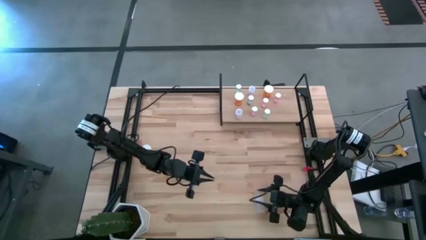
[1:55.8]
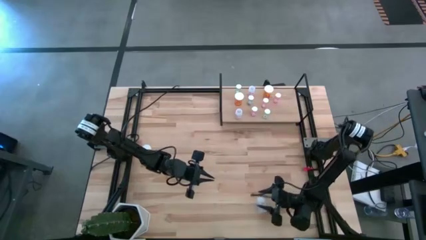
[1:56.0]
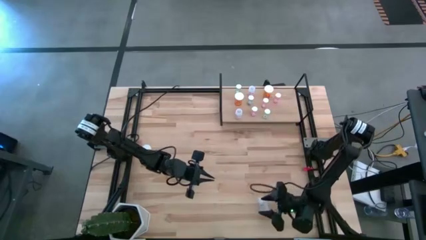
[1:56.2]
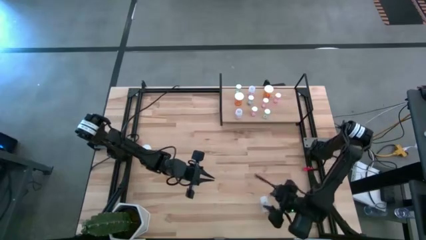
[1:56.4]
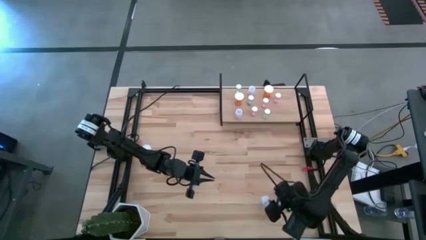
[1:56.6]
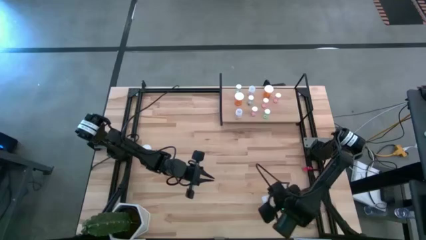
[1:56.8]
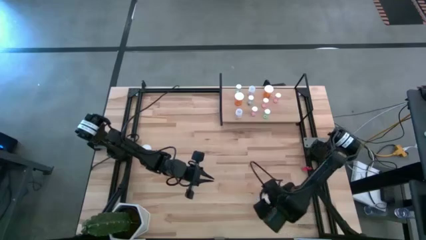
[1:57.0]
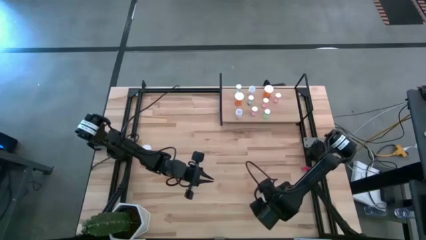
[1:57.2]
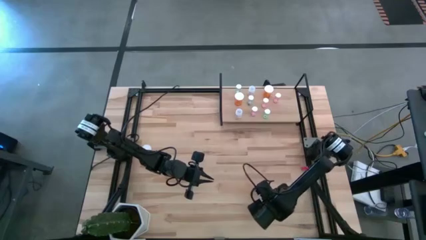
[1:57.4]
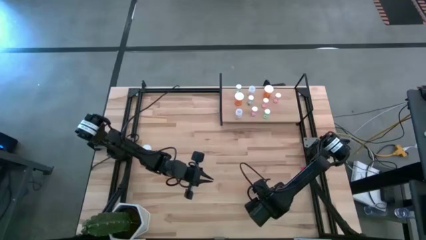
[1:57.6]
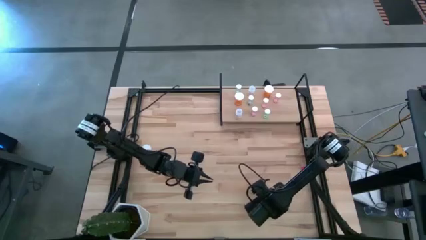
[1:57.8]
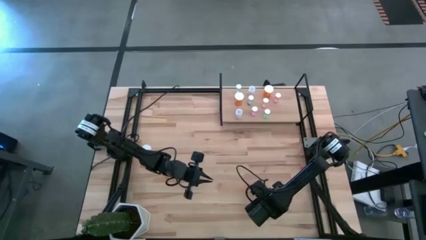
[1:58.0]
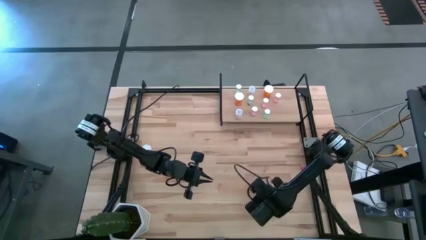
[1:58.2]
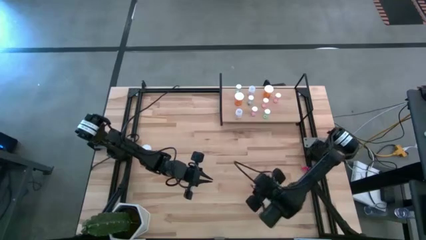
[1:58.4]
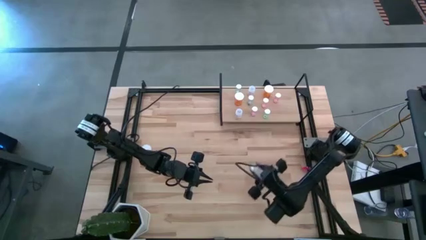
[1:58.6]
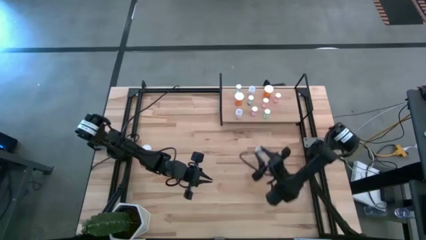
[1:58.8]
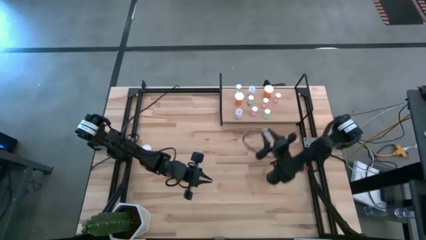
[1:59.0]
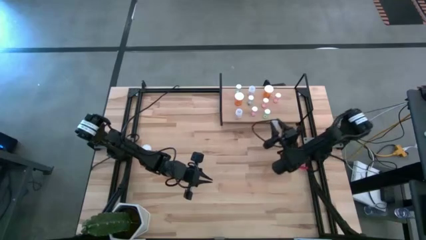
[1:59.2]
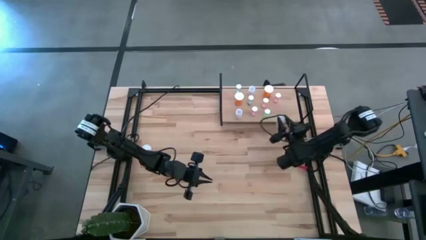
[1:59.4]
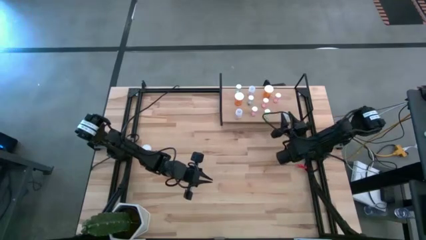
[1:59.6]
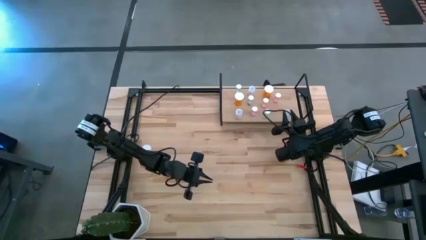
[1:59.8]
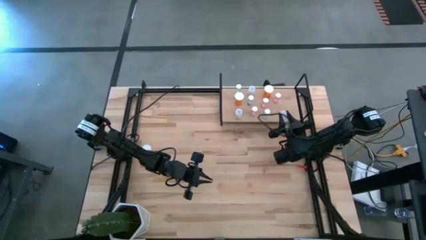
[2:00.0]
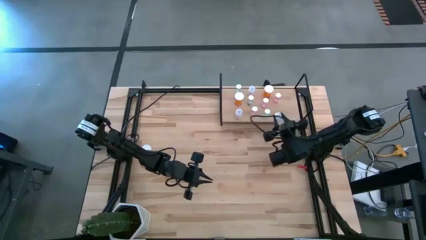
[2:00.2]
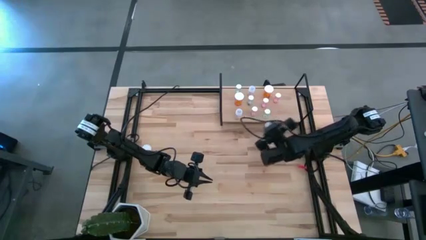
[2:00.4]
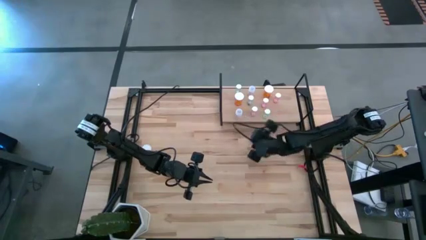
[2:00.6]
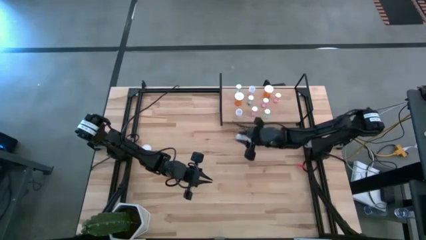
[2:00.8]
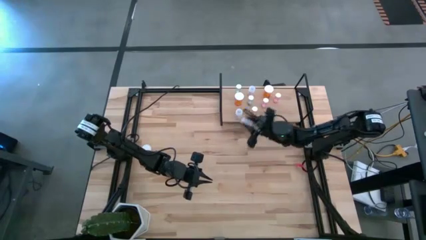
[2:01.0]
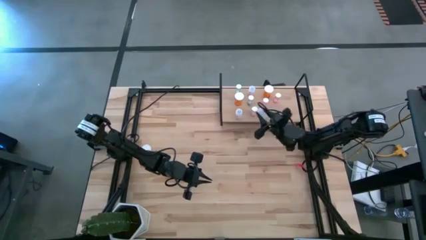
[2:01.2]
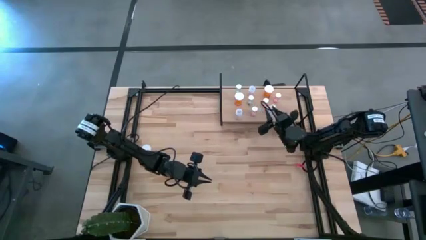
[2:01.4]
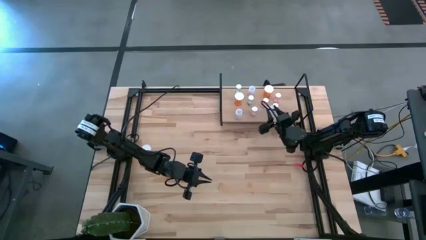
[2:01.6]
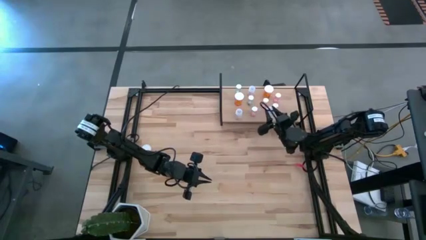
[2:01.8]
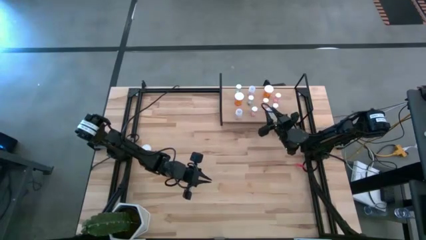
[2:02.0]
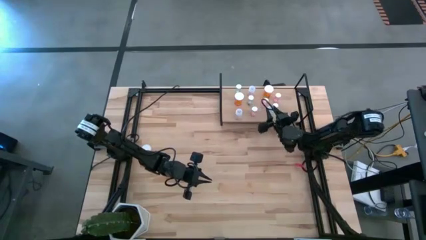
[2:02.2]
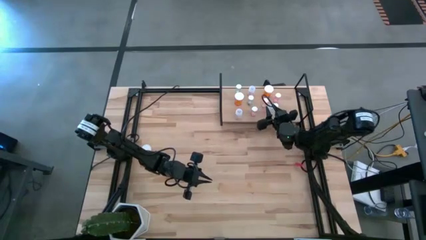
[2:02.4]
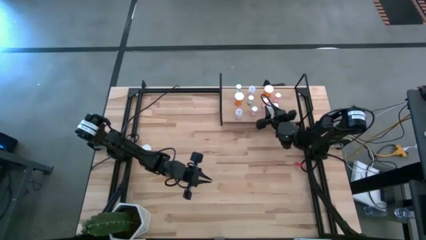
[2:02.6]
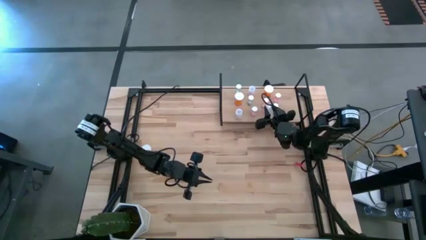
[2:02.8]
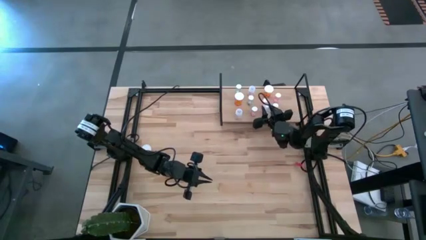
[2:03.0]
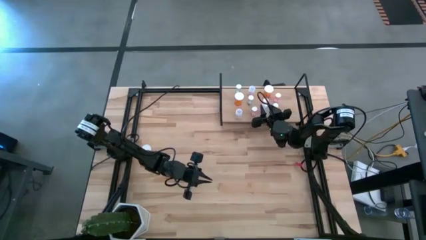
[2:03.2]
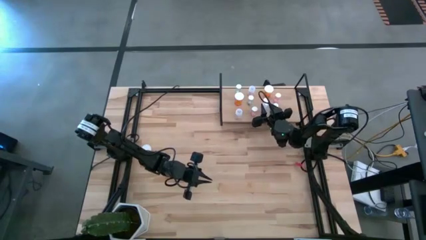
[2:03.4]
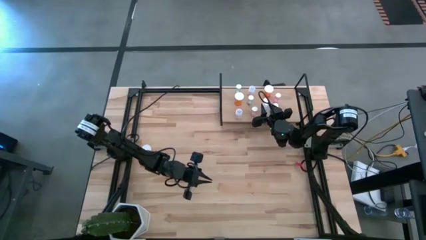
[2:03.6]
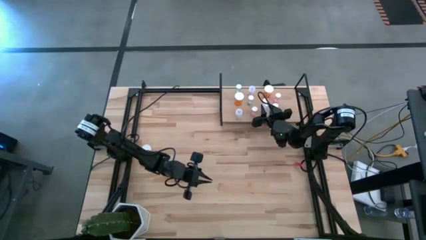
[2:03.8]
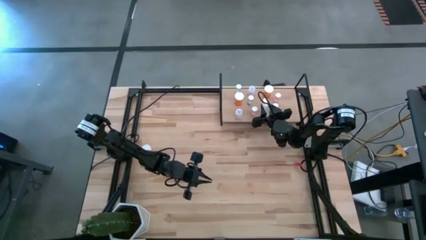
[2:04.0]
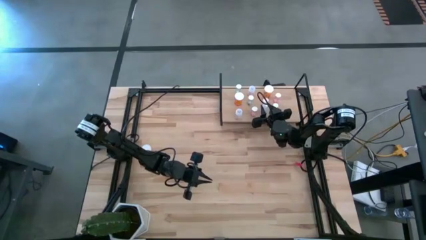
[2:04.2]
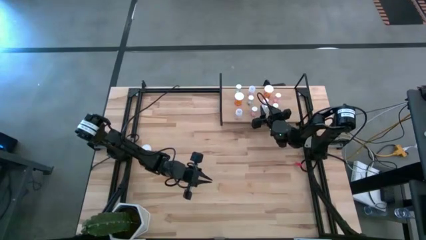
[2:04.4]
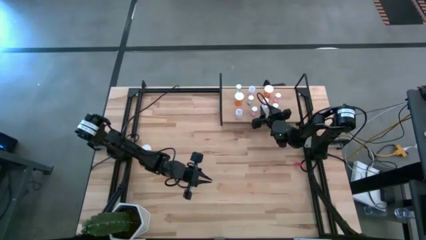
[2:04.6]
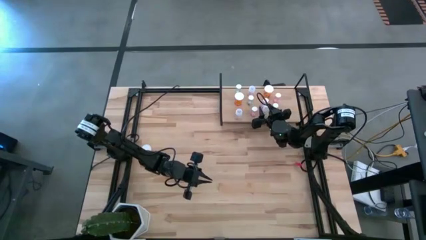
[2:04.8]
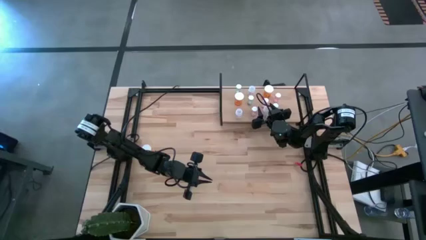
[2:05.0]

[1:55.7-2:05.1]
Task: Pick and place medicine bottles onto shelf by color
Put the transparent pill bottle on the shelf

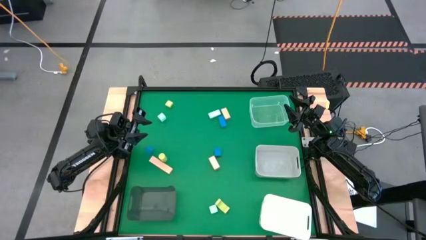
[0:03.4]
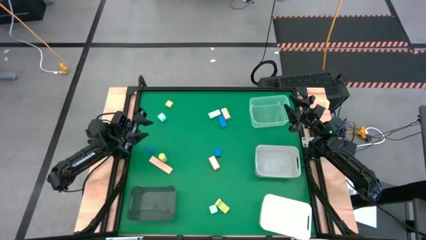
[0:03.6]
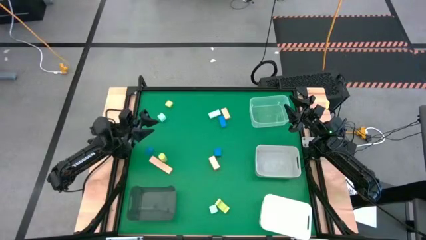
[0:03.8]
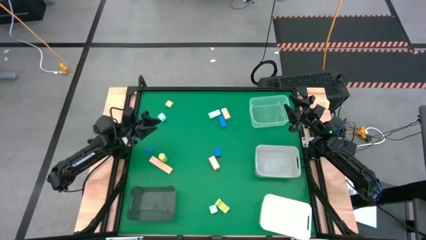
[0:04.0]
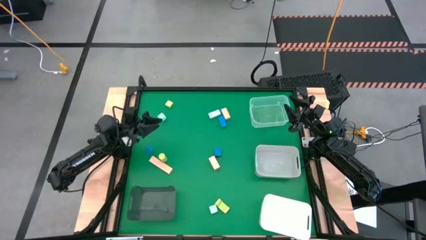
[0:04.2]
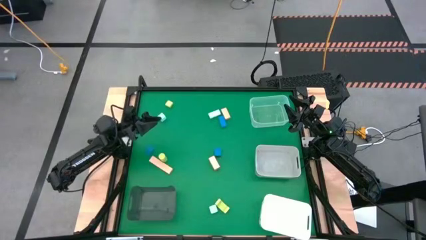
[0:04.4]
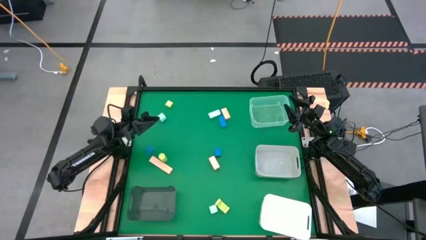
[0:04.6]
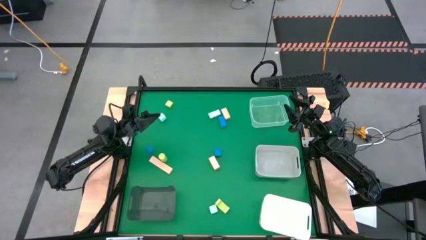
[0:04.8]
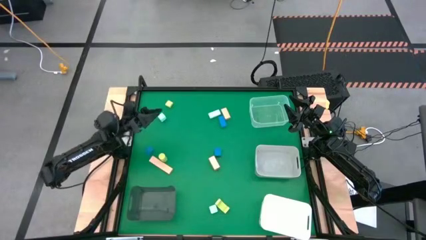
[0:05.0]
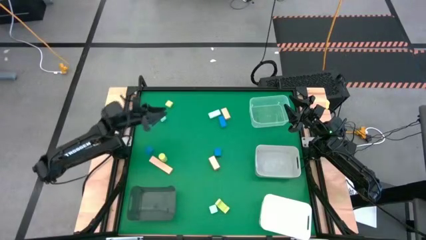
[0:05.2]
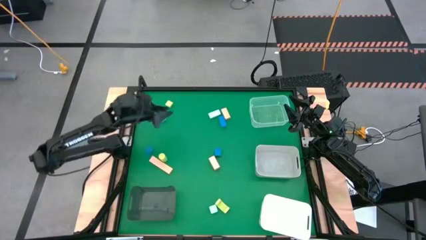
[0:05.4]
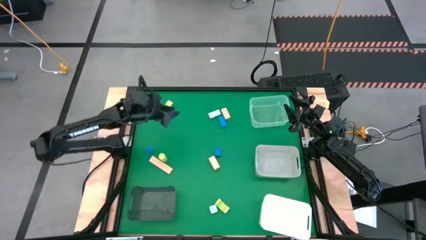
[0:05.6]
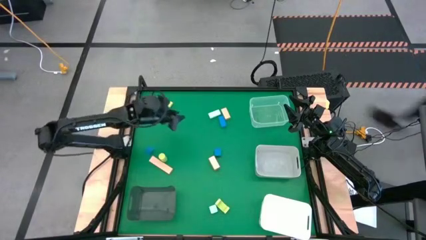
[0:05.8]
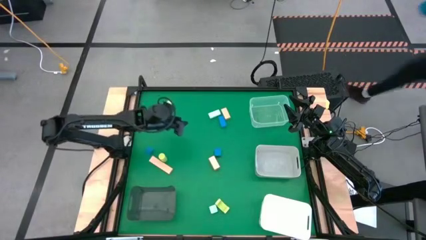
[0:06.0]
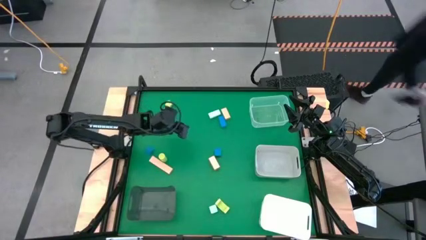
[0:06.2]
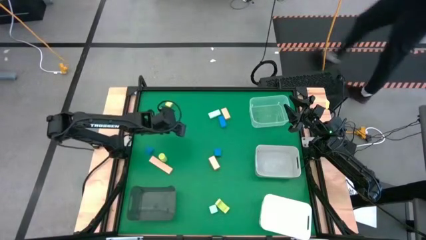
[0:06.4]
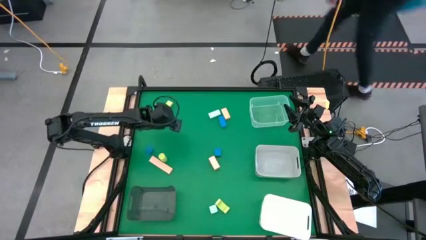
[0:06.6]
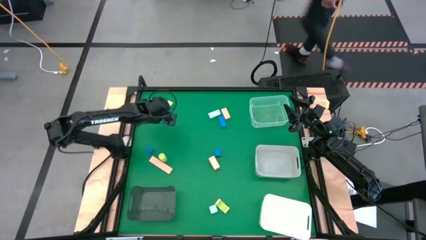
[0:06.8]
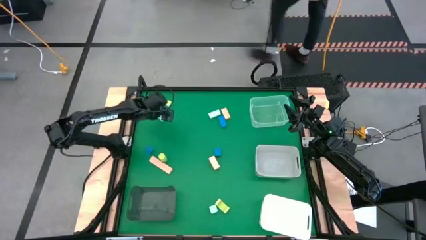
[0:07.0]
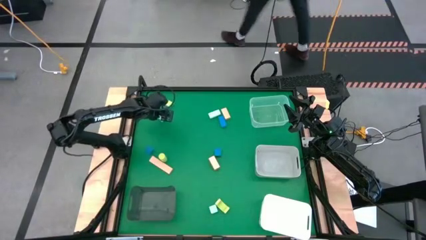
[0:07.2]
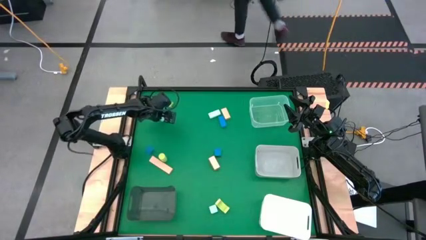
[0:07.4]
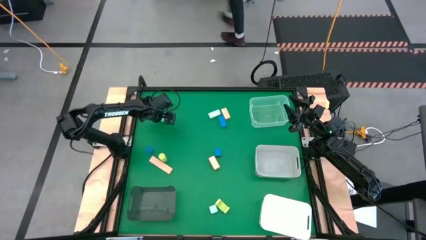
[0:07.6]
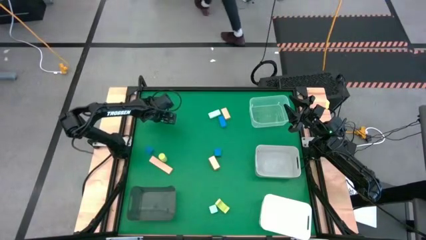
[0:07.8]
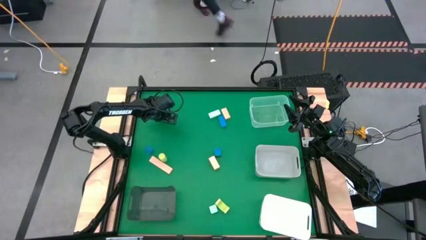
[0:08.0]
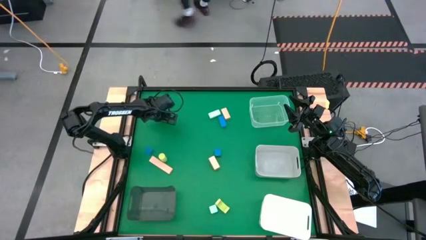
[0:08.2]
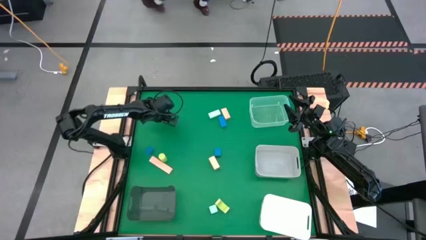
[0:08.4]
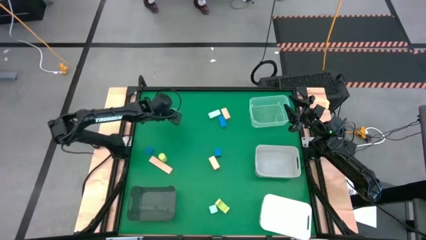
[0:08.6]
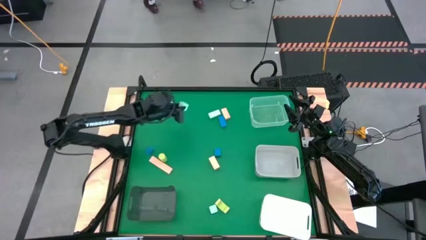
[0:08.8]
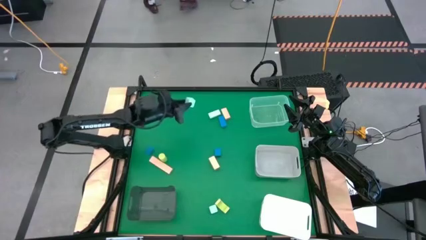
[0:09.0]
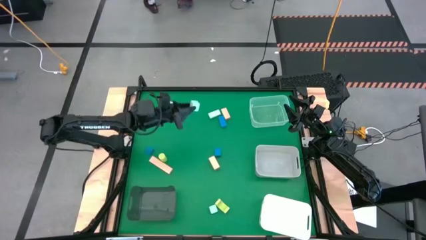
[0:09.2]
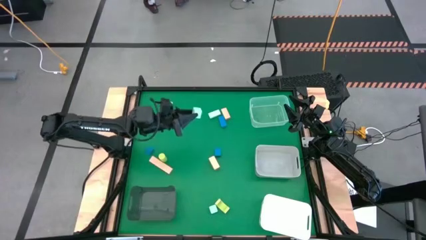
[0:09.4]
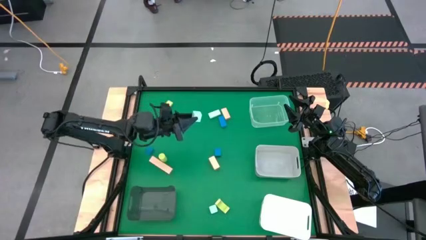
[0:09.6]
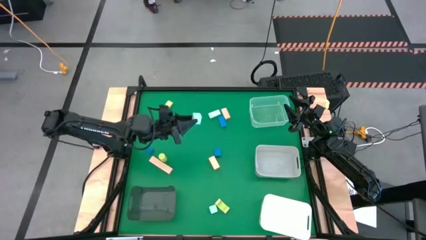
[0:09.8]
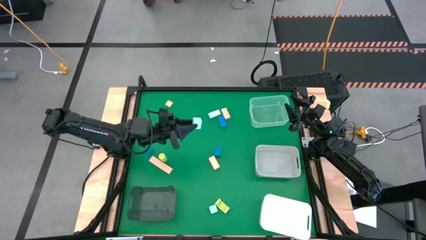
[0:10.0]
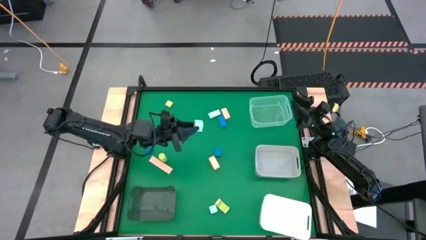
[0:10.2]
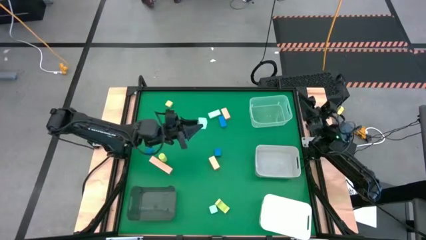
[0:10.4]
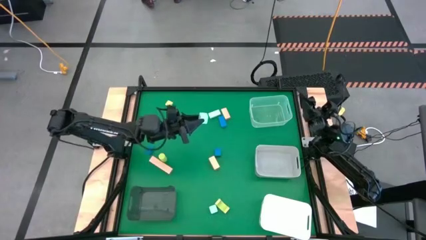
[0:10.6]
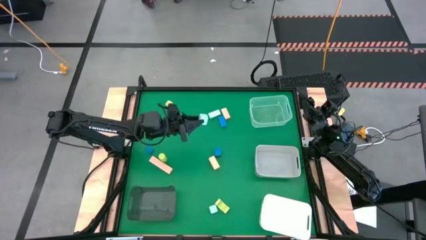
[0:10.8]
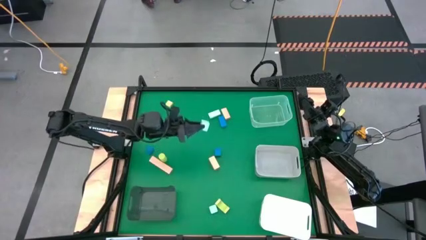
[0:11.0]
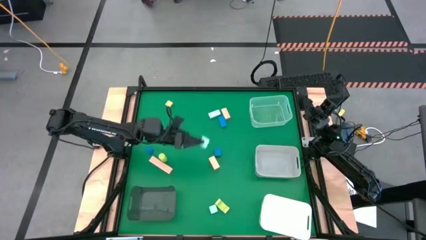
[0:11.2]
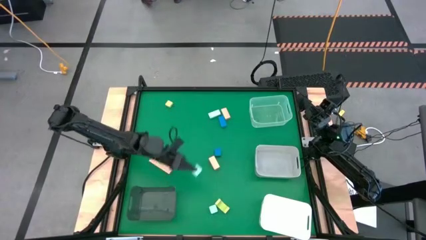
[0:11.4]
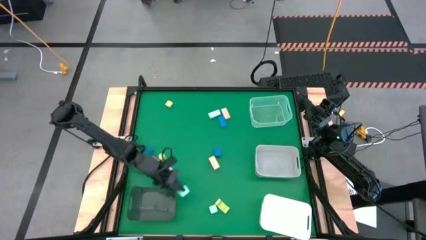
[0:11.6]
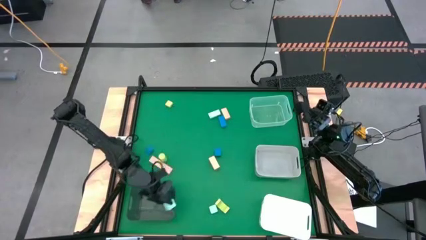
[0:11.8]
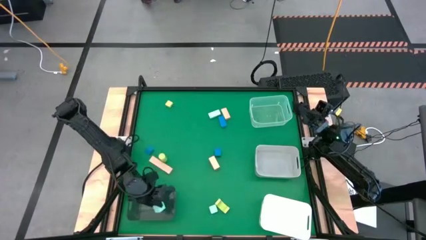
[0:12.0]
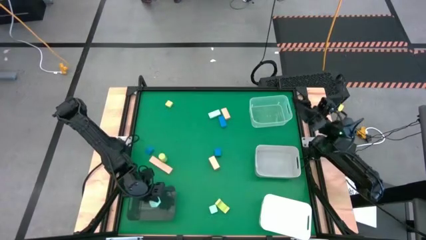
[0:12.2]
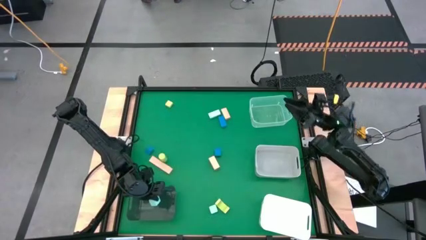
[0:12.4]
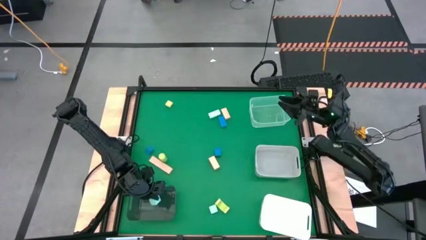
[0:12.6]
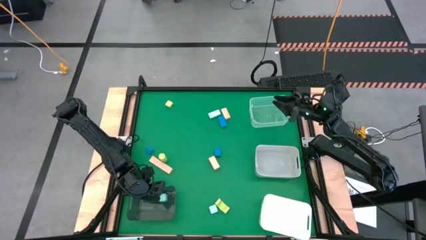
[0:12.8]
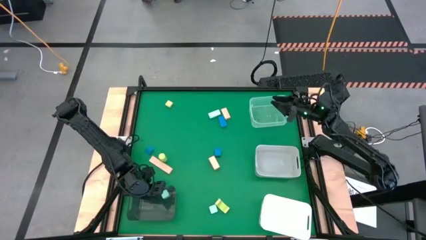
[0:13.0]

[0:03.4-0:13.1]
Task: Sort & place blocks by color
Put the top left light blue block into the black bin
